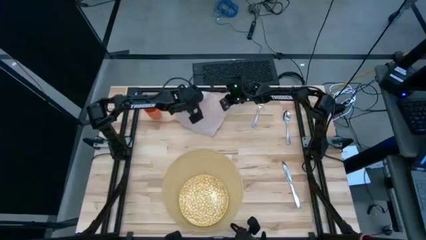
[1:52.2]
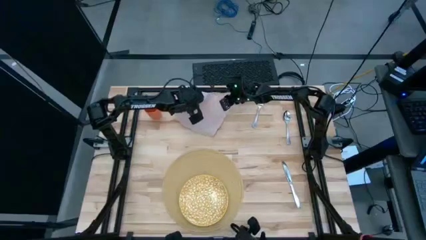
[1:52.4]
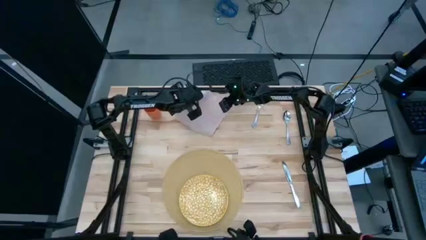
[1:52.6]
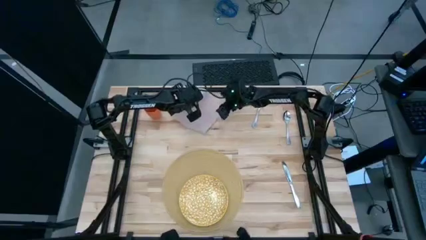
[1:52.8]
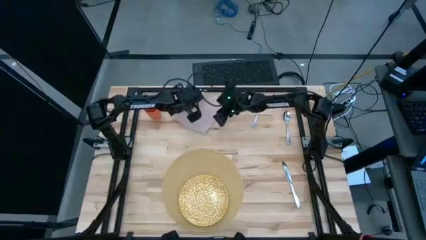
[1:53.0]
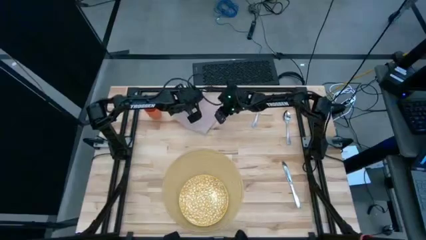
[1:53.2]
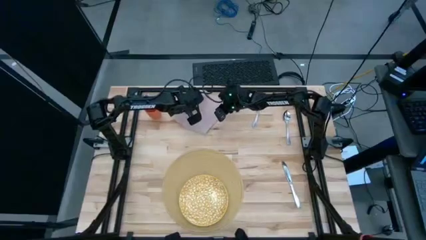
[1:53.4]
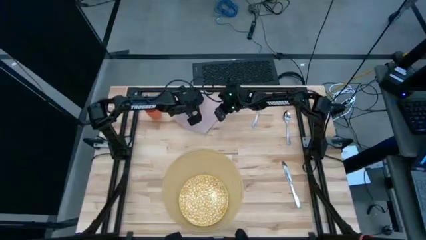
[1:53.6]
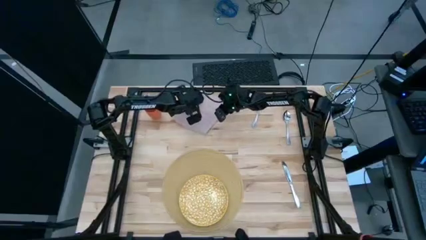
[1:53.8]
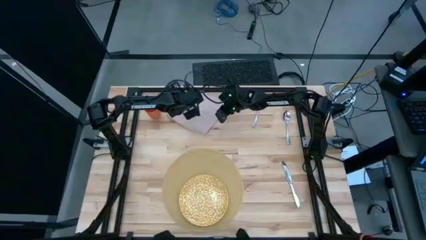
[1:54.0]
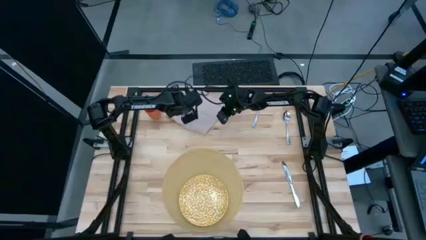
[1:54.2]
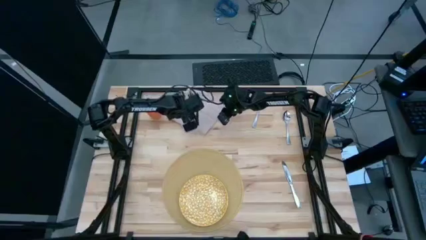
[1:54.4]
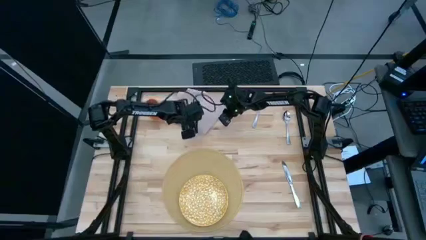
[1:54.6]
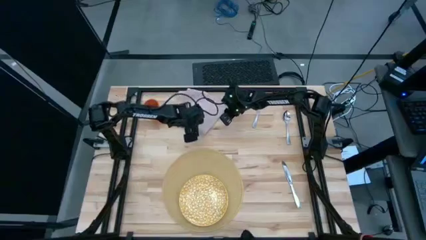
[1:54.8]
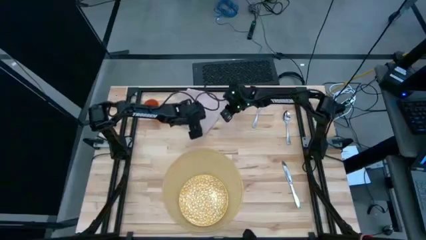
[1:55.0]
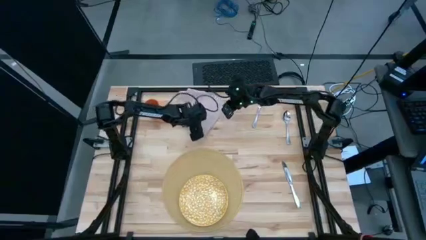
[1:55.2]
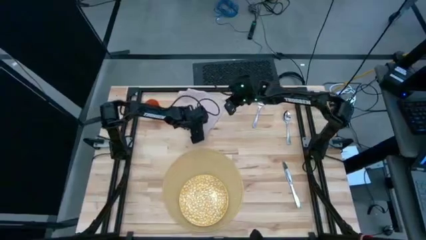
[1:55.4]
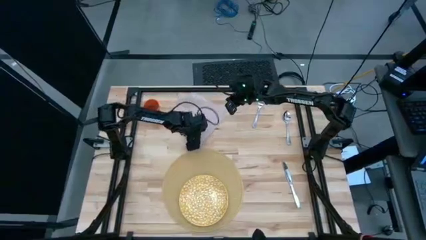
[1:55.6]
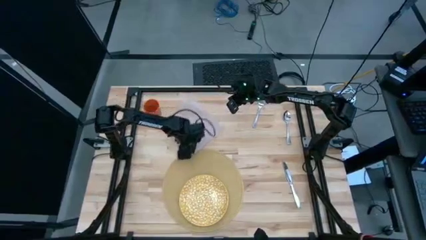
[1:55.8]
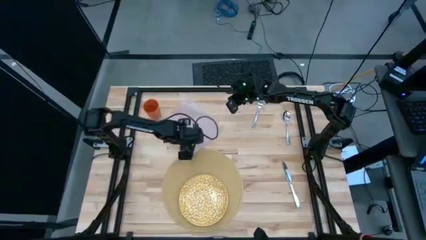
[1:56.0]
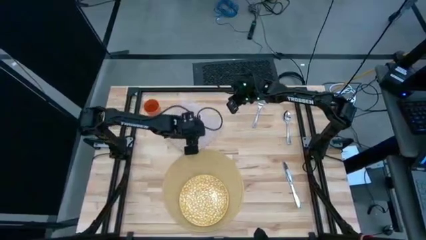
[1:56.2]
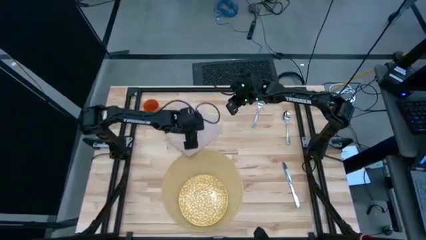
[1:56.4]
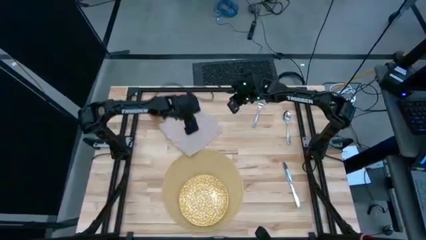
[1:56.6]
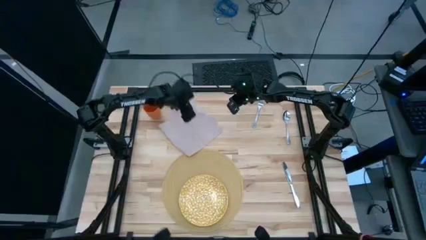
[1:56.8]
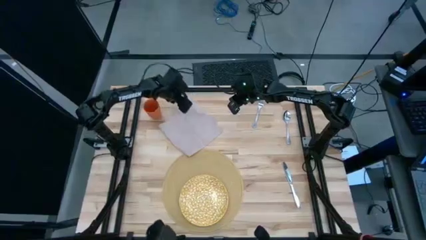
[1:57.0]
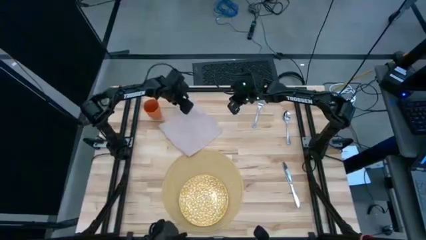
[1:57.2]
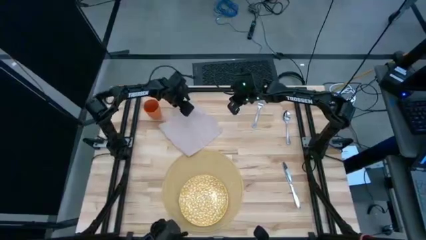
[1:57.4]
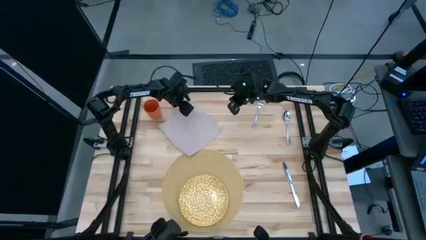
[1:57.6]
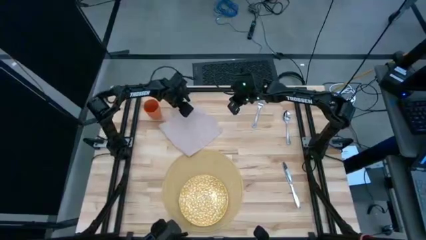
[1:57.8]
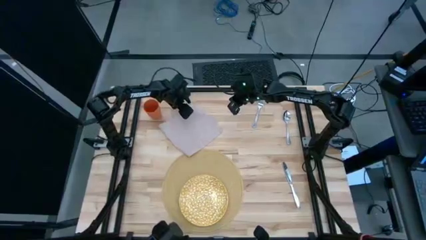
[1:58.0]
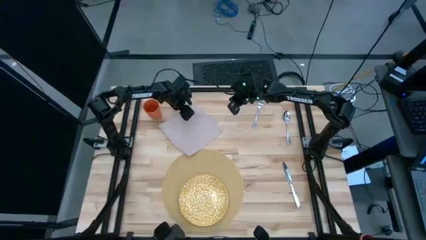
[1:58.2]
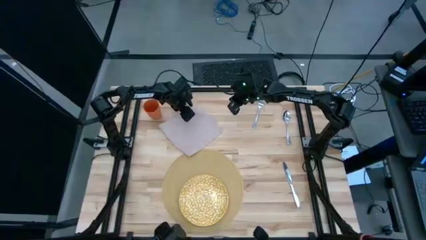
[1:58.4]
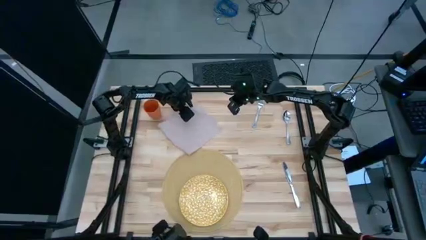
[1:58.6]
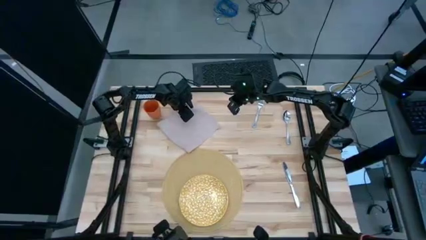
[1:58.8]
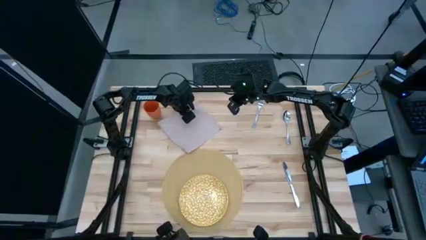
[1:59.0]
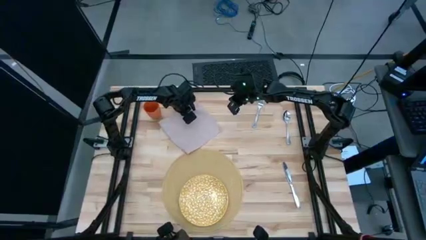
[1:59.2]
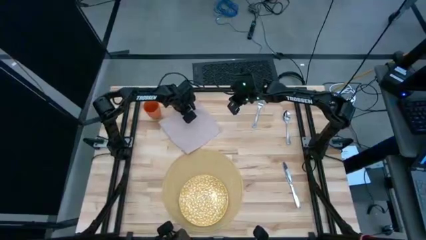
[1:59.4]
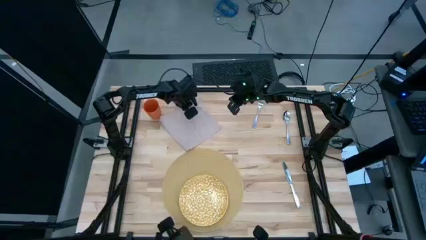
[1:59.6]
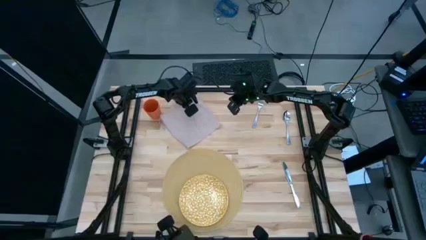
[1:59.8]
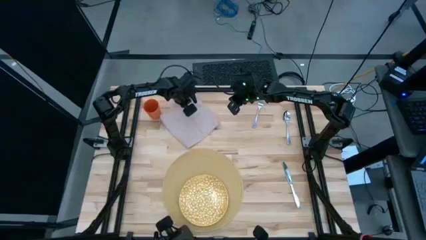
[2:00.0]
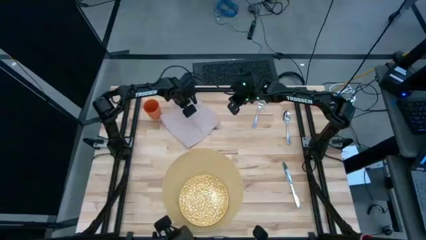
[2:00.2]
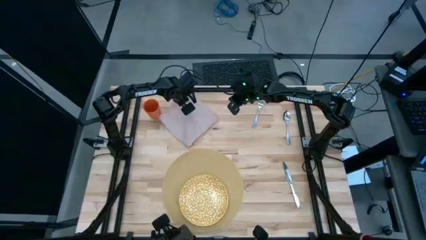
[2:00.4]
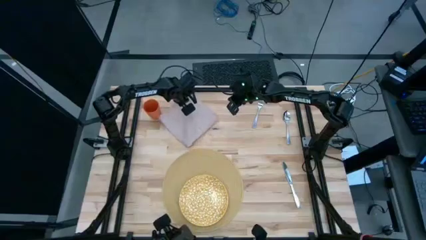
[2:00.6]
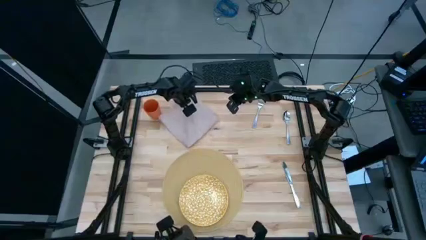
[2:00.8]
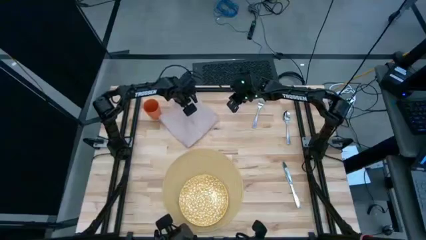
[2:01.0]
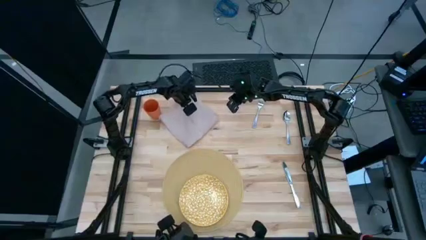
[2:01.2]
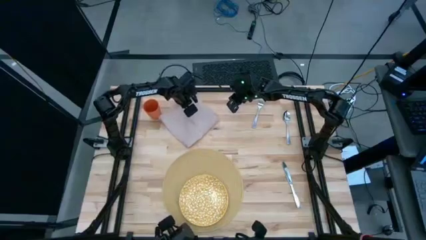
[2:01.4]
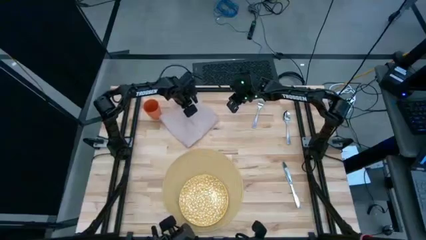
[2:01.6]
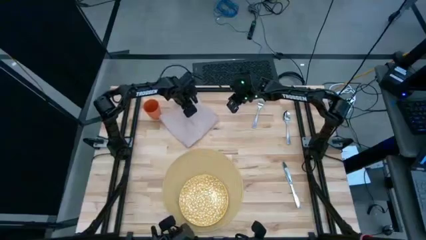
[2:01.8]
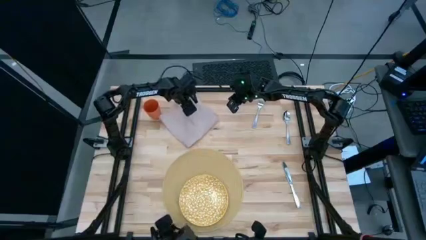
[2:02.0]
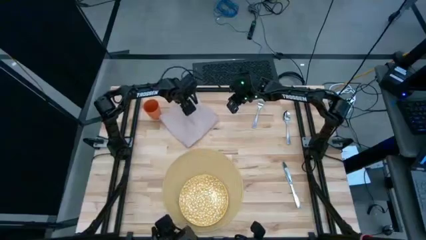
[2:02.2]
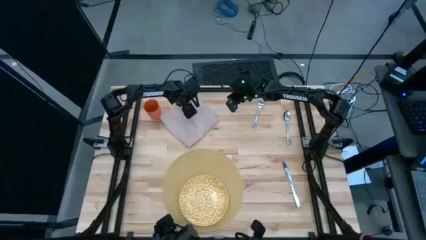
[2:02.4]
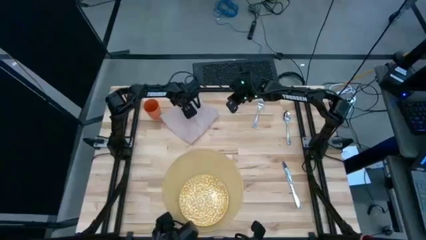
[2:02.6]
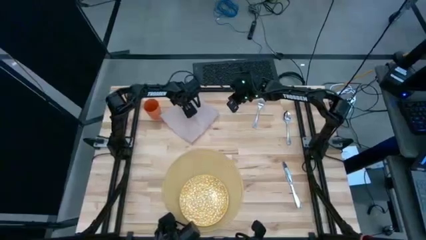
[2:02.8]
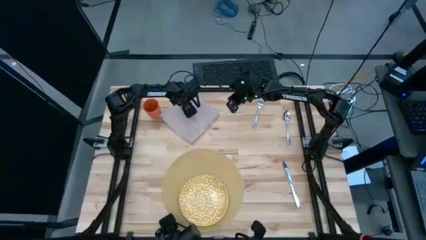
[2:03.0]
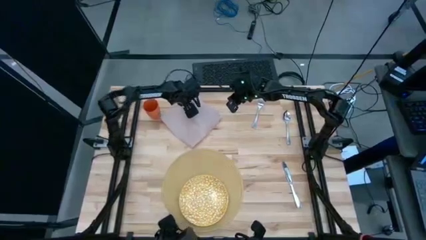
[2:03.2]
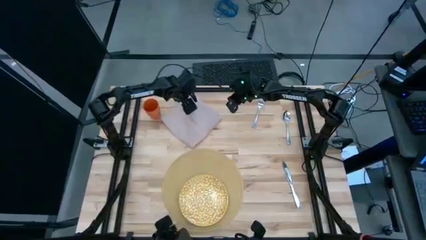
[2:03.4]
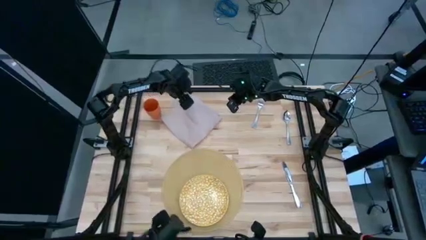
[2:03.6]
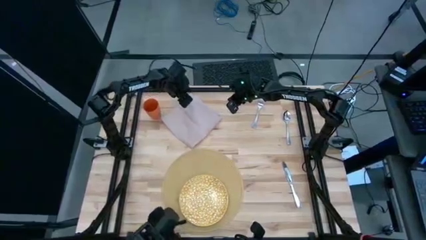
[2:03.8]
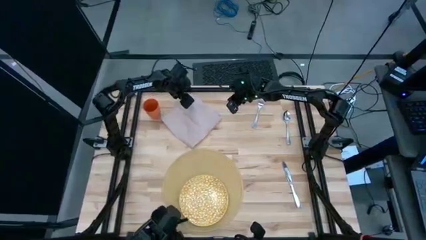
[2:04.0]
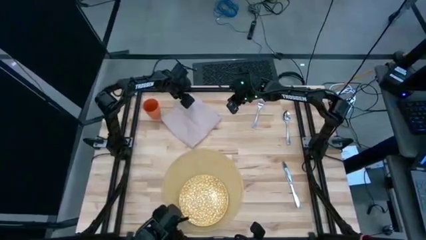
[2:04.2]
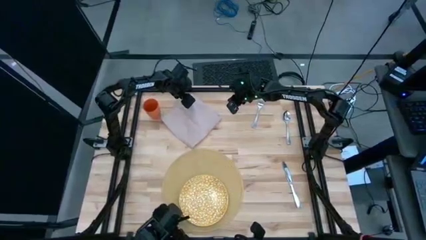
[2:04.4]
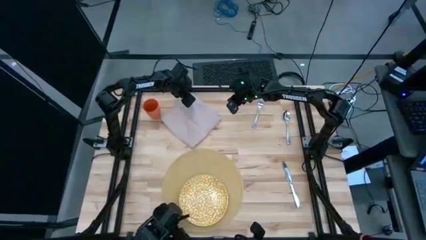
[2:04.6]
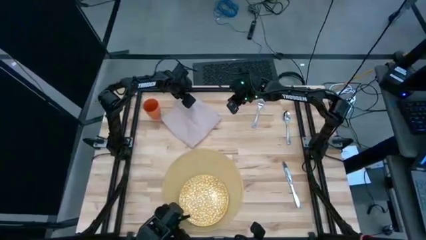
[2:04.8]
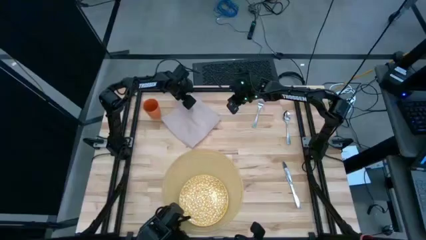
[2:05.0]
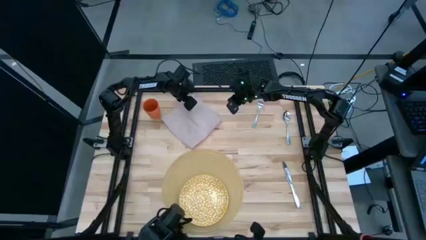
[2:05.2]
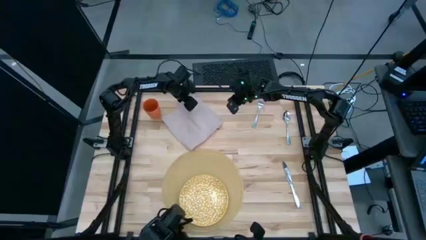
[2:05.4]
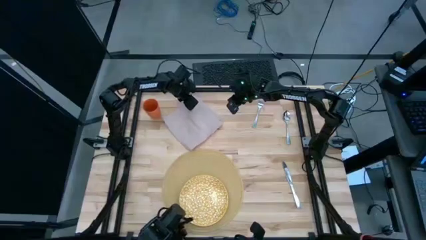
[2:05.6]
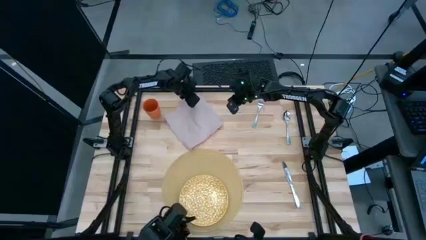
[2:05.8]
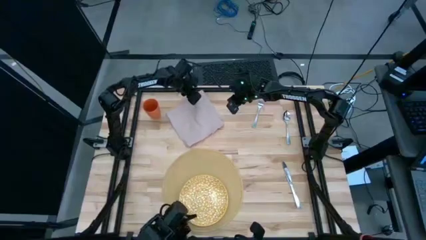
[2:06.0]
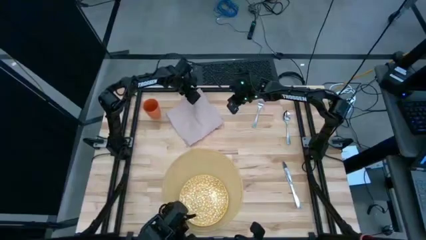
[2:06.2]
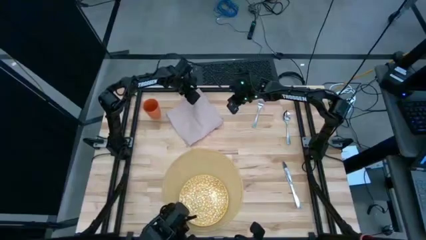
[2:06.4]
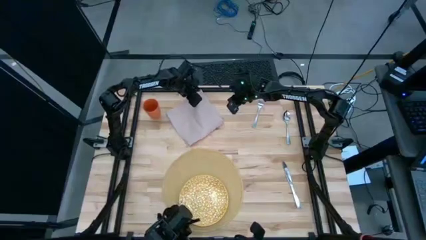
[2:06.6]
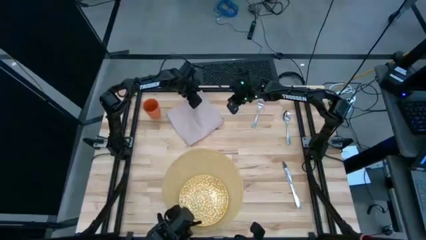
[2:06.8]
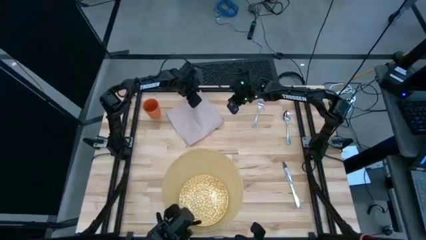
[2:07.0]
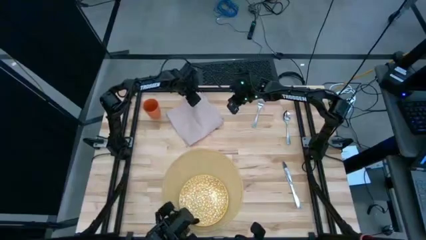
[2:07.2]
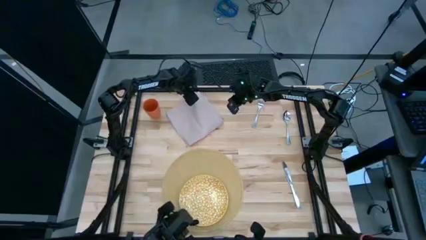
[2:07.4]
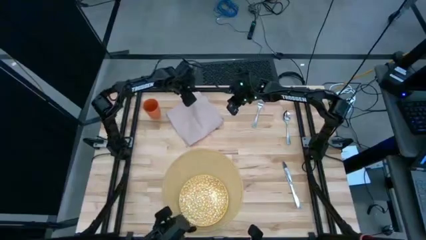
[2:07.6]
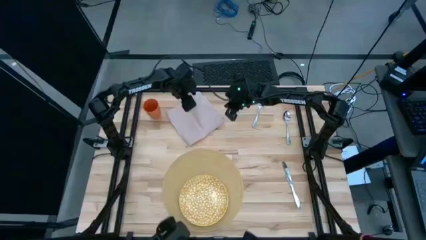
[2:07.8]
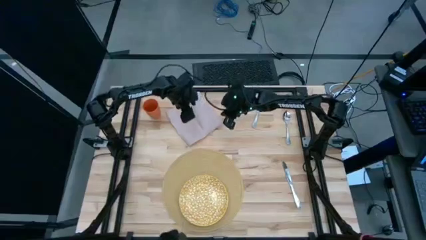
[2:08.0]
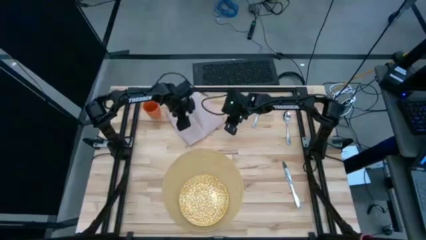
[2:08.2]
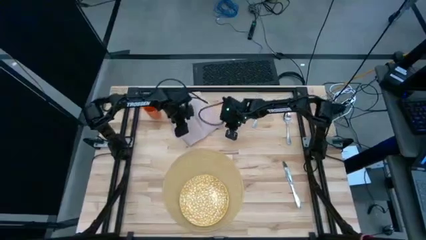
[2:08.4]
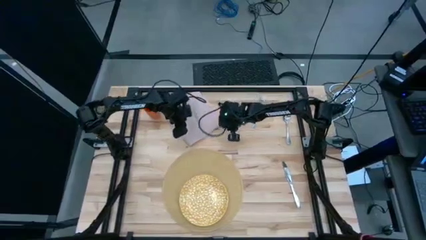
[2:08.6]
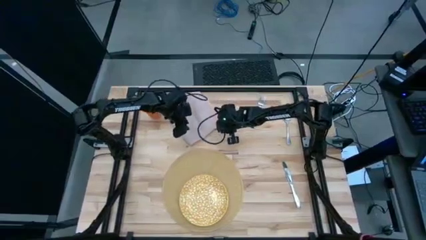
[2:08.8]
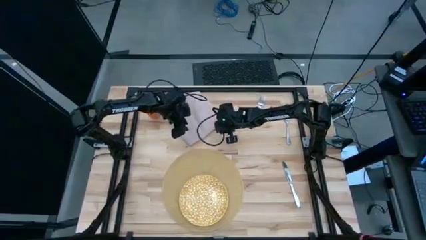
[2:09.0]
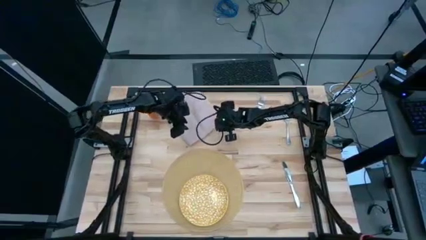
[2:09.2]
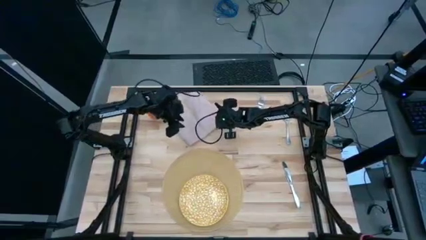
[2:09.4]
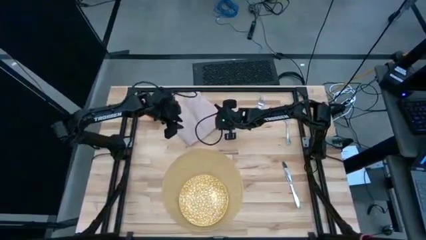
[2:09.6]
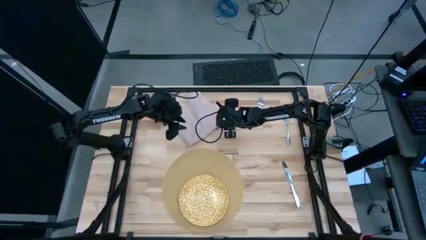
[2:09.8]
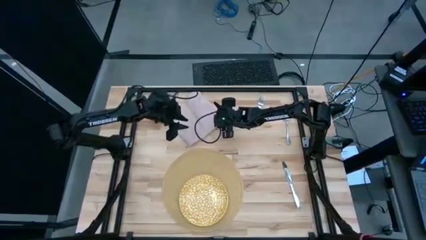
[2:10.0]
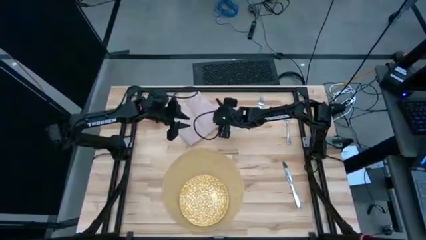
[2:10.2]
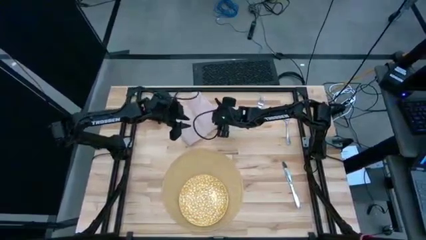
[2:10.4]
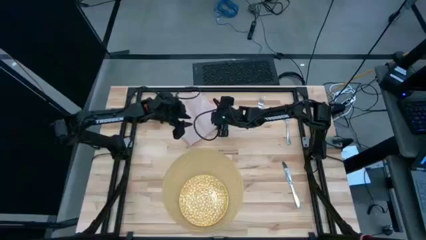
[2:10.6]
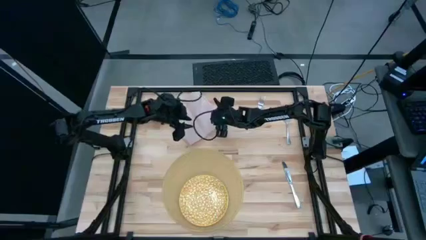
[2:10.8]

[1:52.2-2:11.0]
Task: Set table place
Fold the light orange napkin on the table
